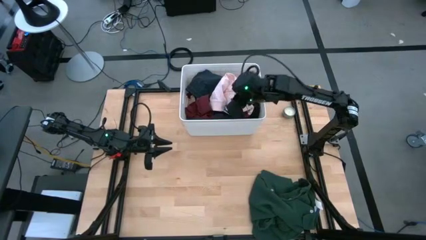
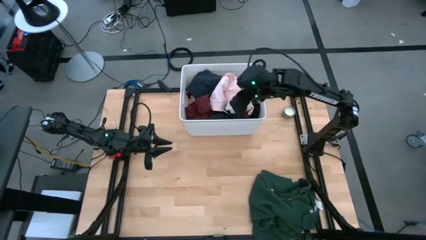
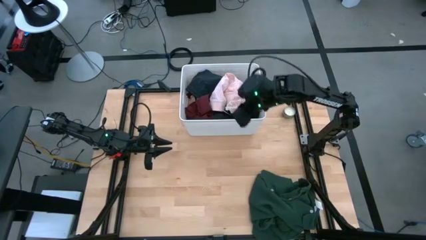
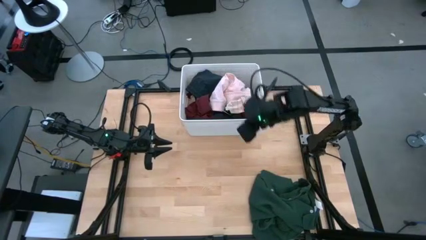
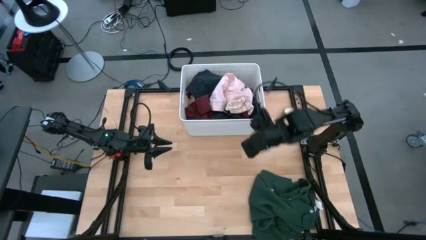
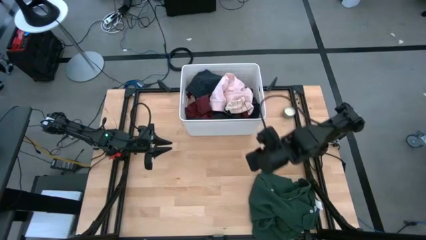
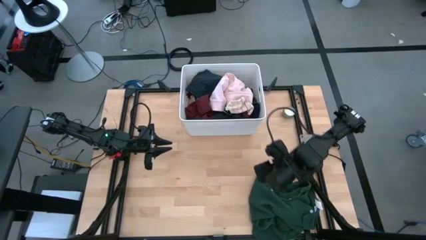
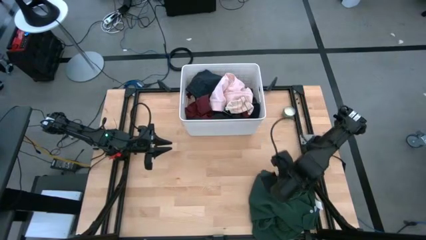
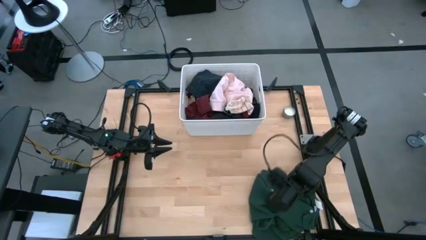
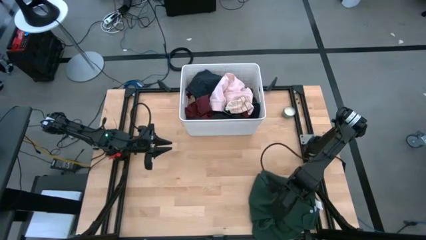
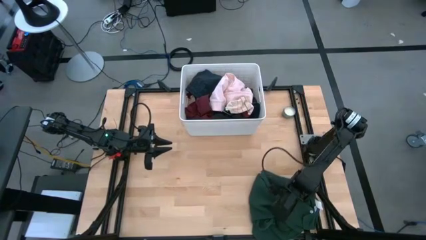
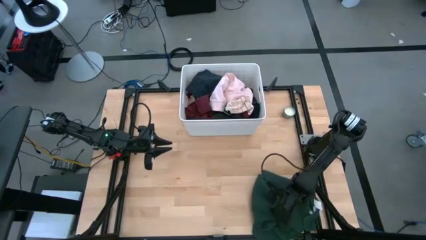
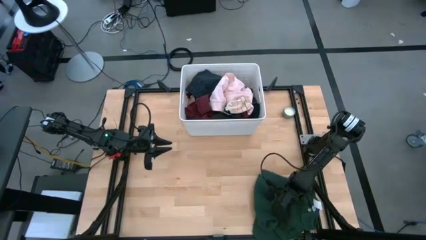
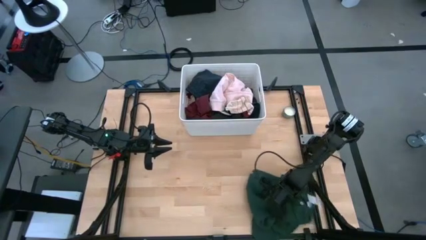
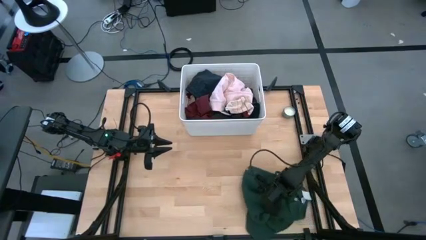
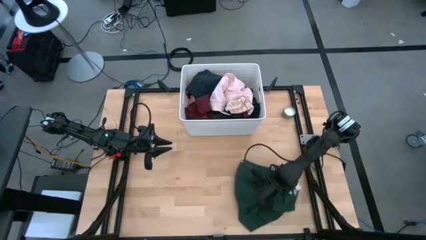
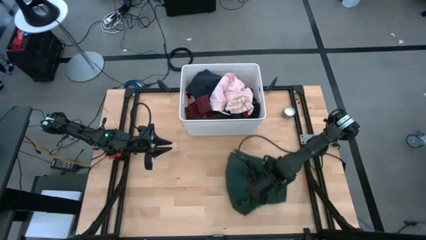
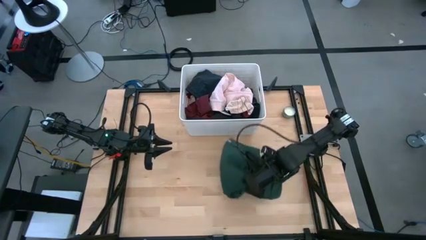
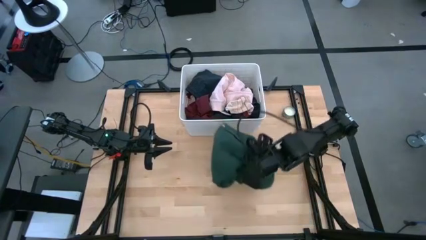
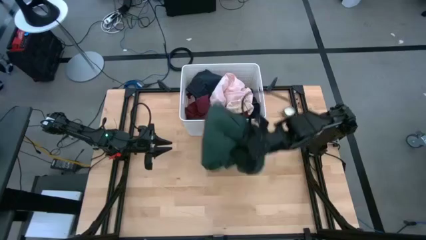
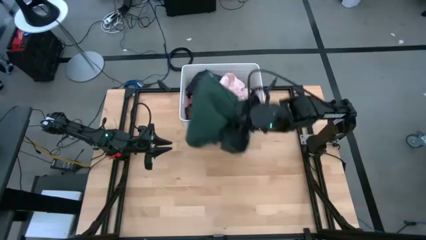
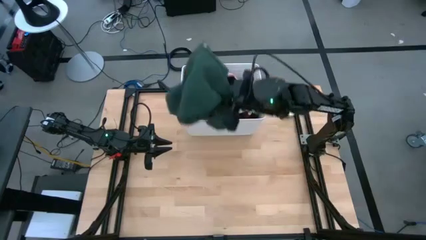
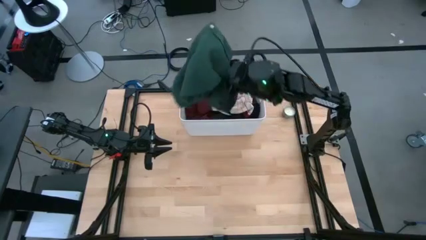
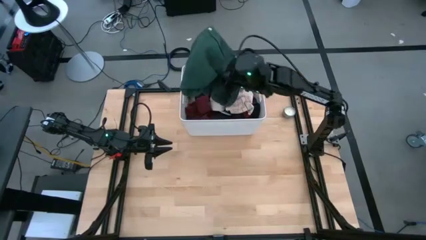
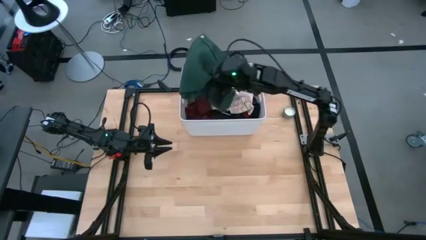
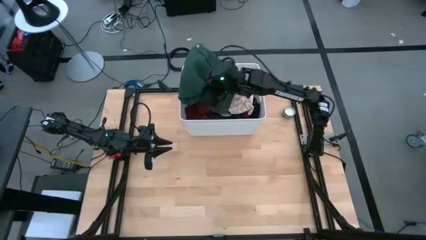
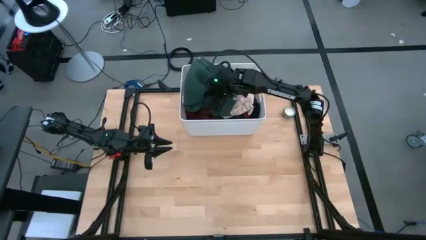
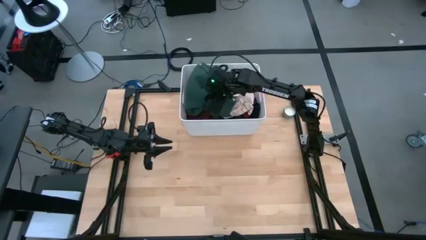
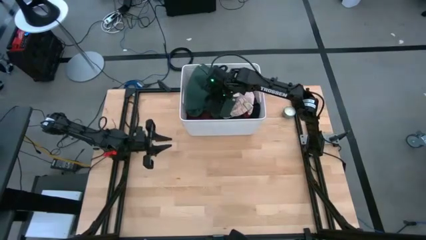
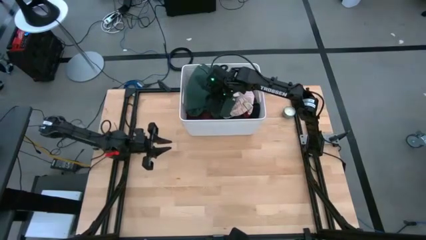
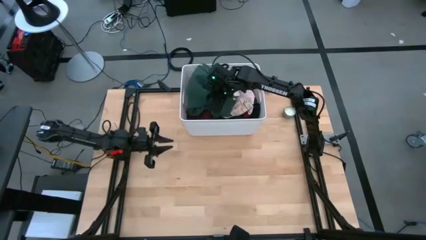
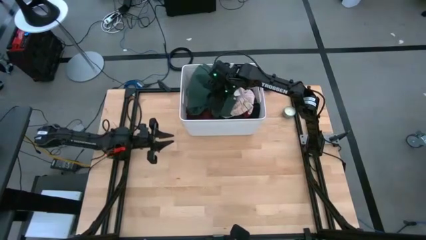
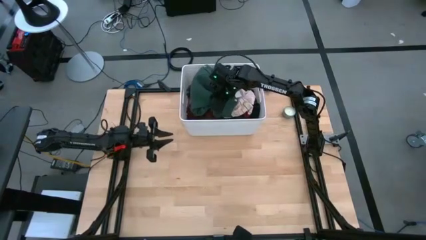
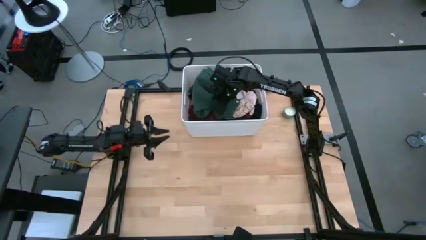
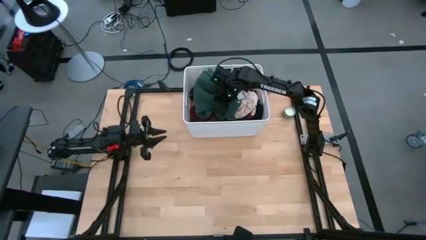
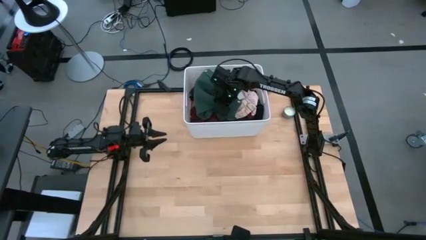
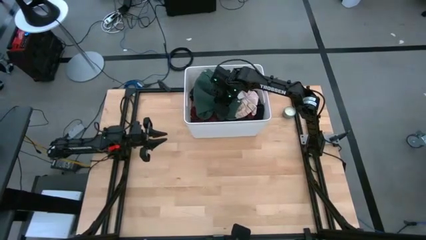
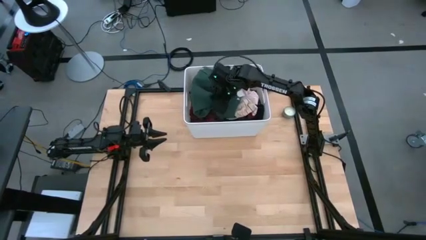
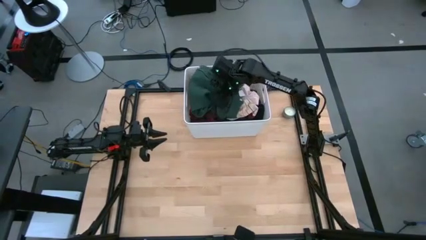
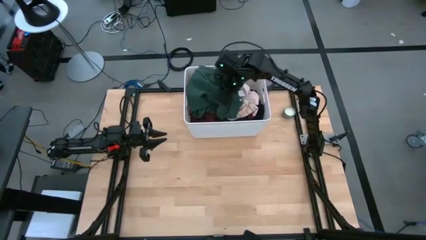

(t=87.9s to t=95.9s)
Task: Sort clothes
Put the green shirt into the white bin

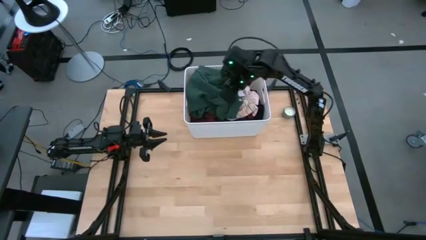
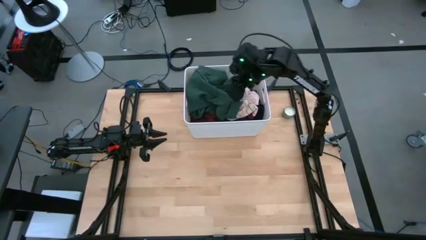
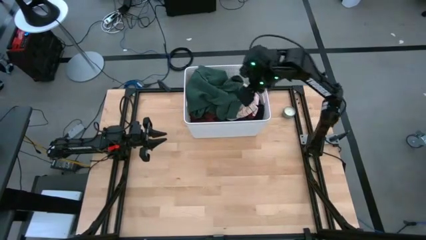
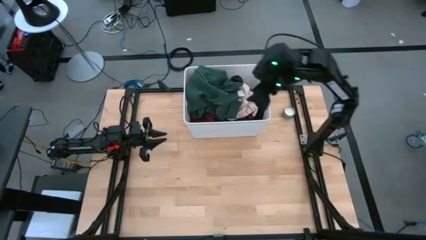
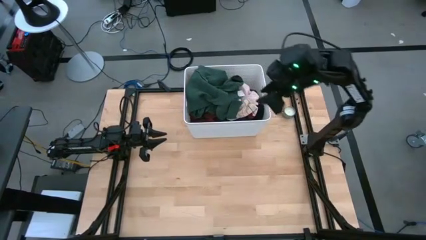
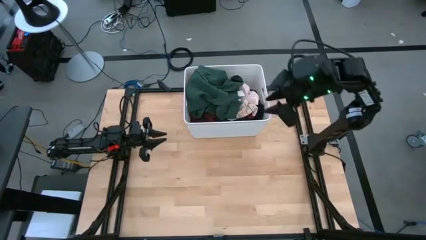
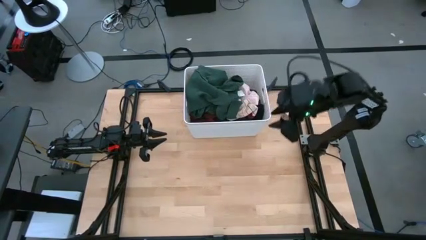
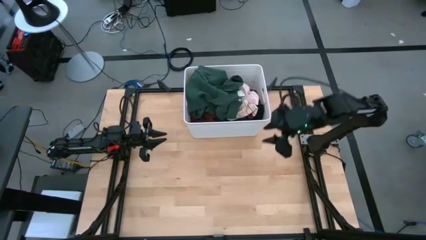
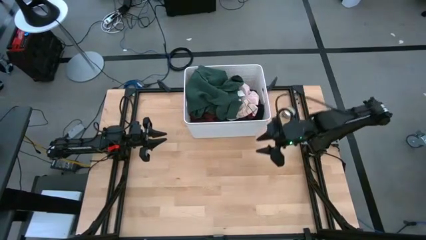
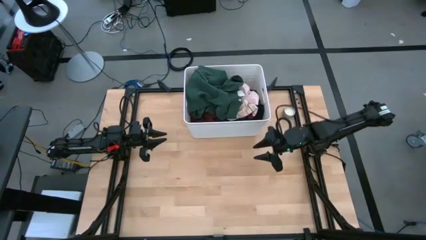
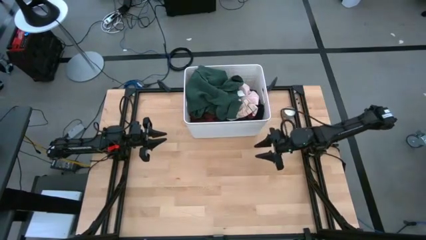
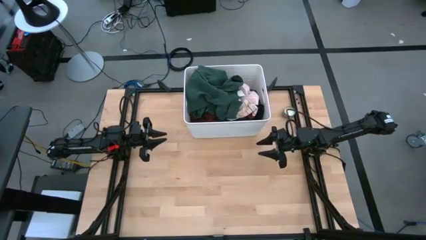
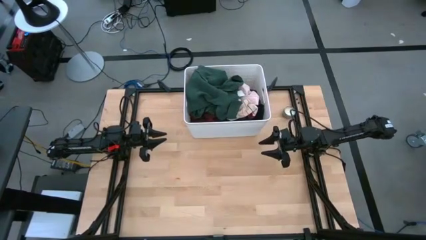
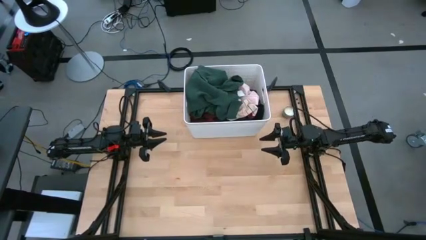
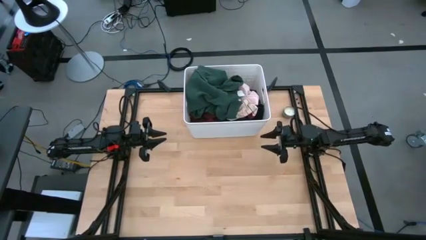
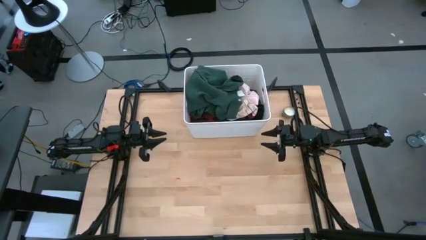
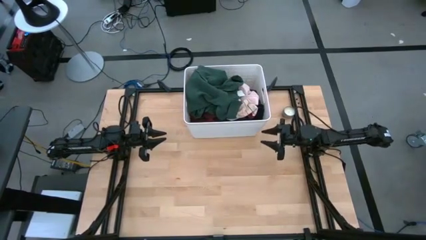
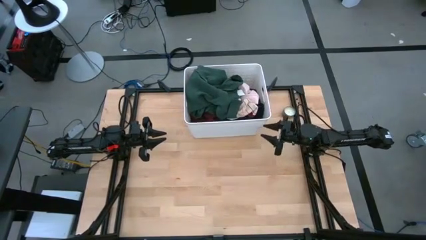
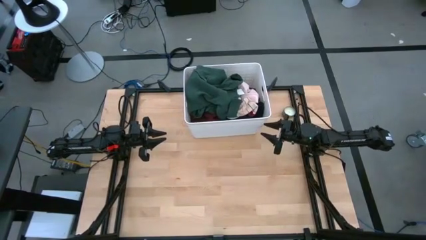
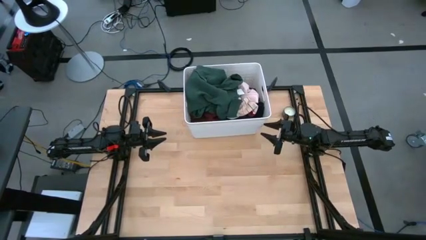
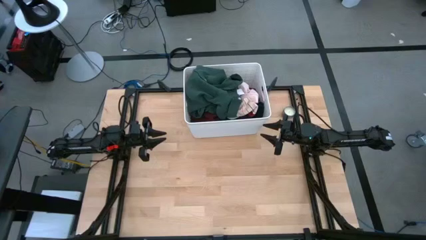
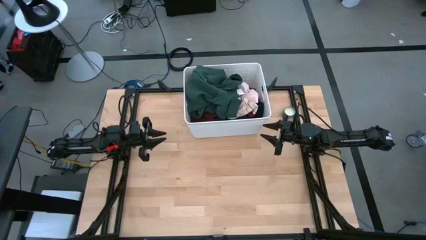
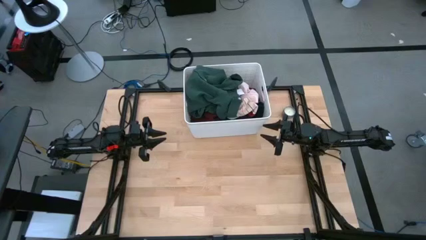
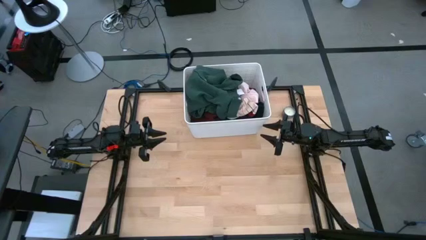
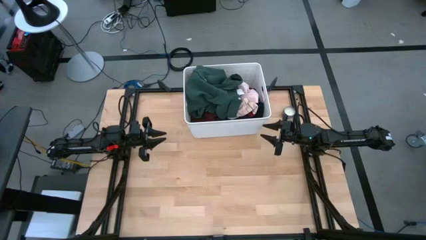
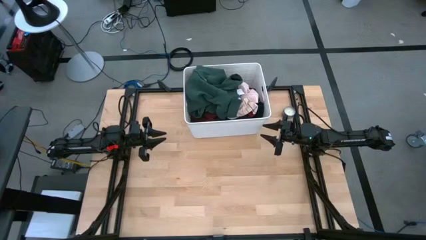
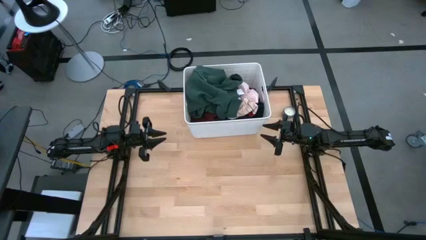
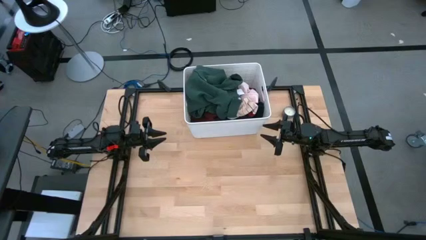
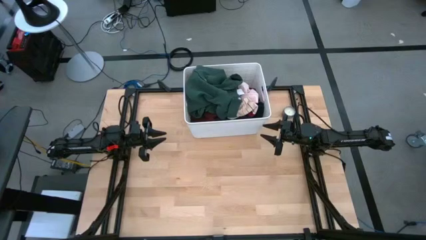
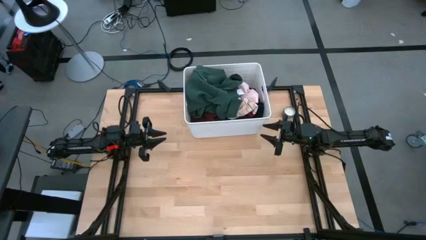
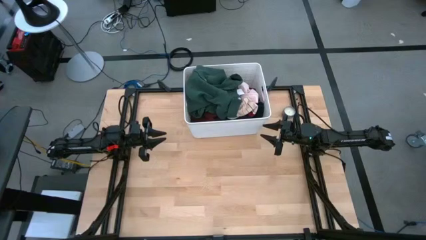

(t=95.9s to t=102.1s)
Return to Home Position
